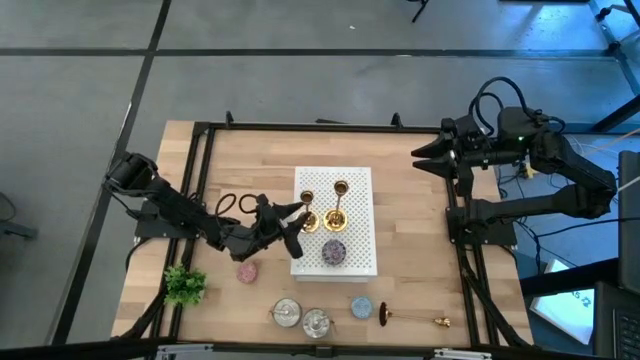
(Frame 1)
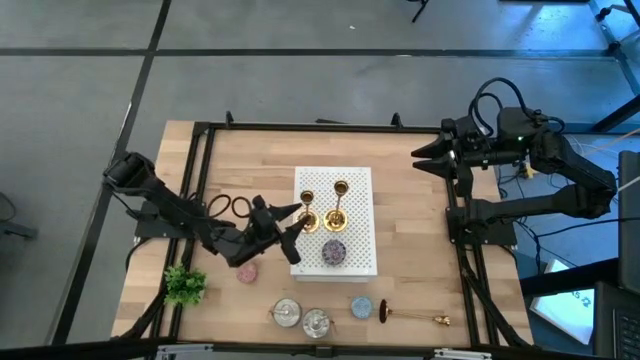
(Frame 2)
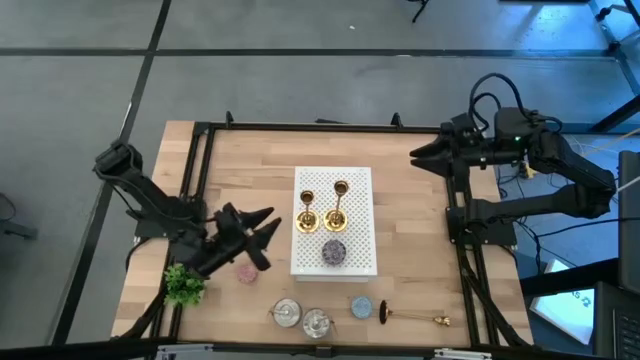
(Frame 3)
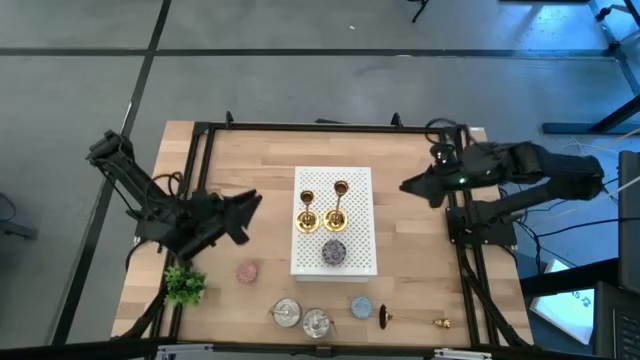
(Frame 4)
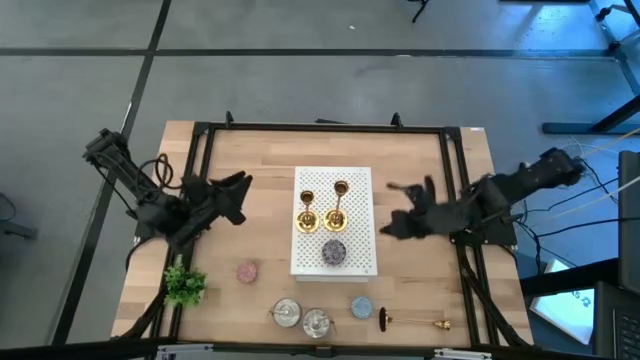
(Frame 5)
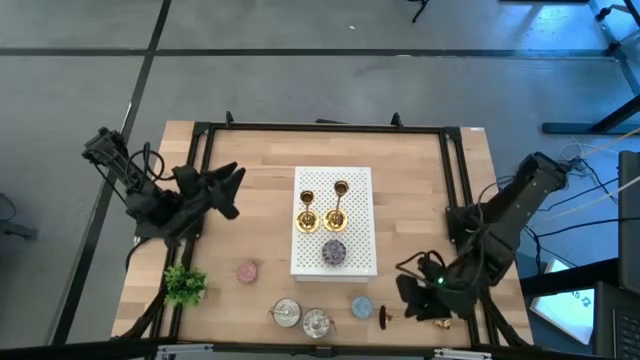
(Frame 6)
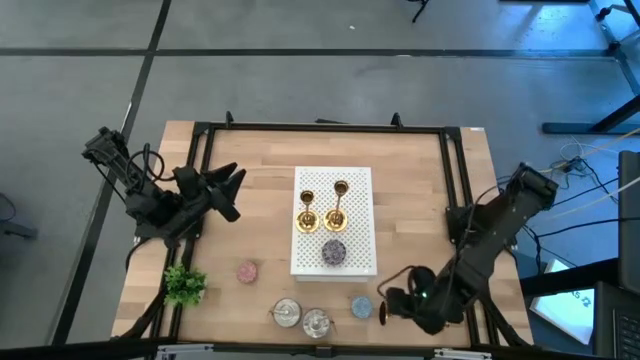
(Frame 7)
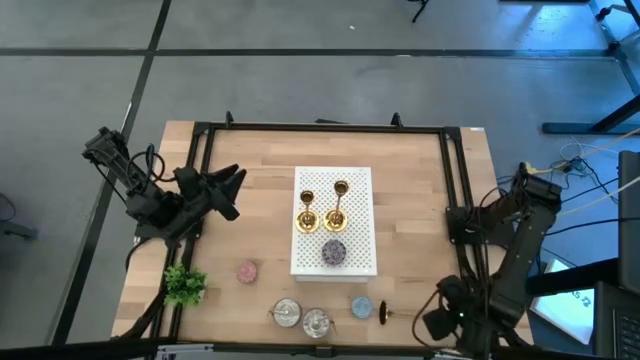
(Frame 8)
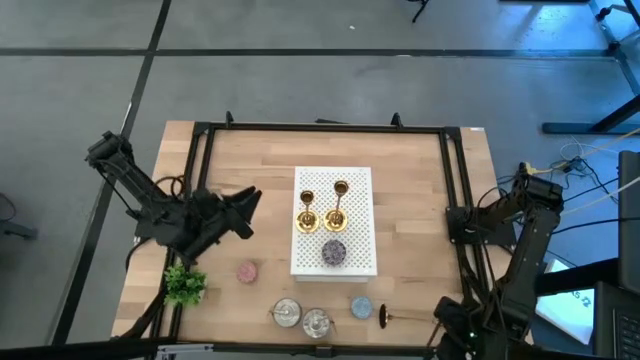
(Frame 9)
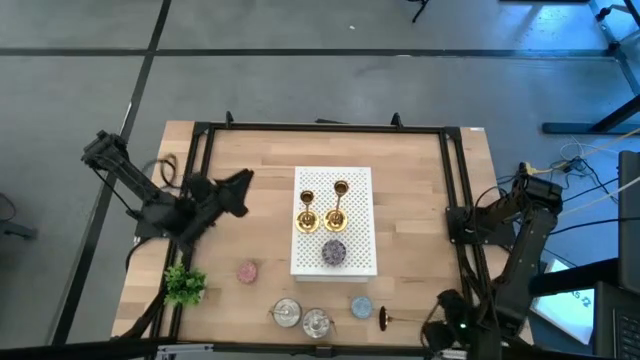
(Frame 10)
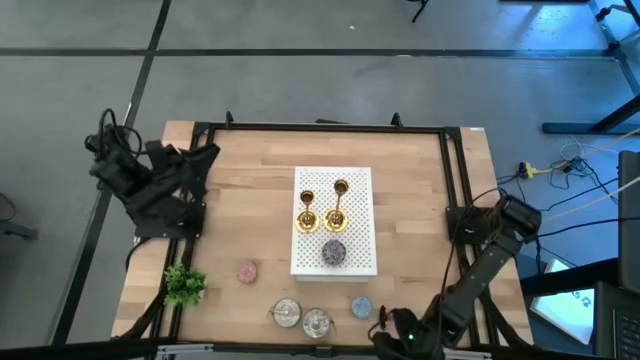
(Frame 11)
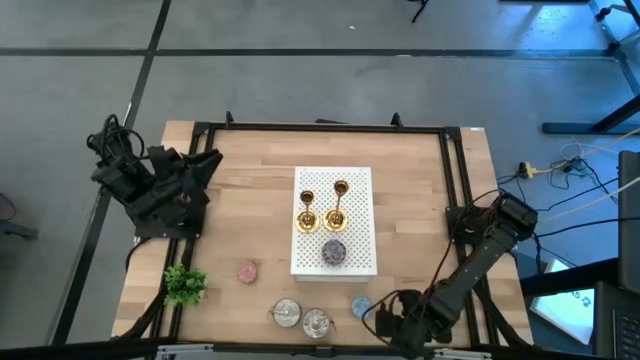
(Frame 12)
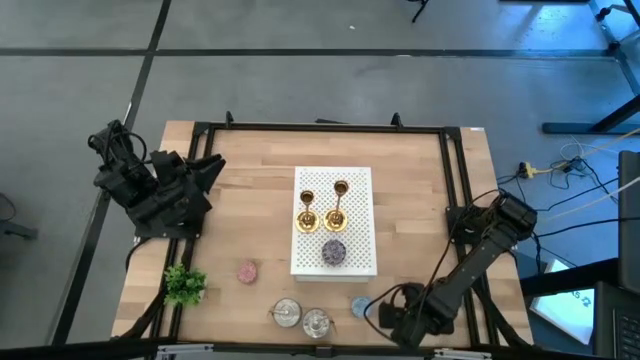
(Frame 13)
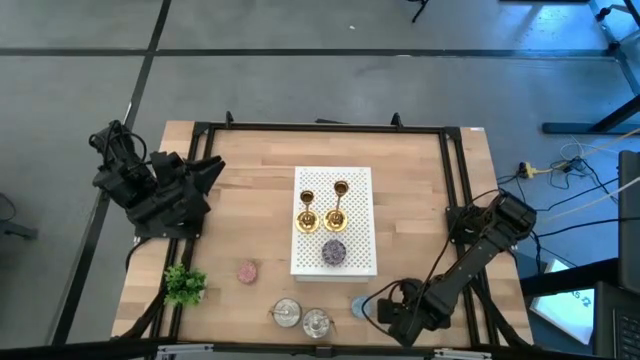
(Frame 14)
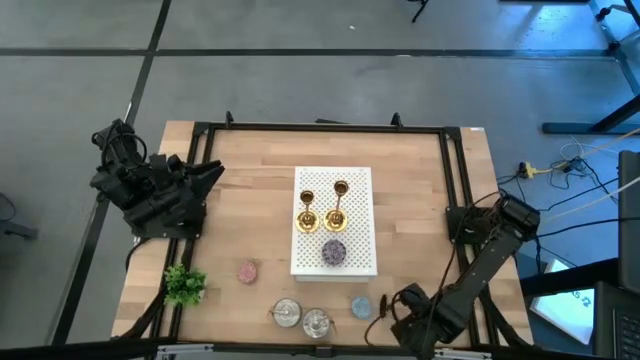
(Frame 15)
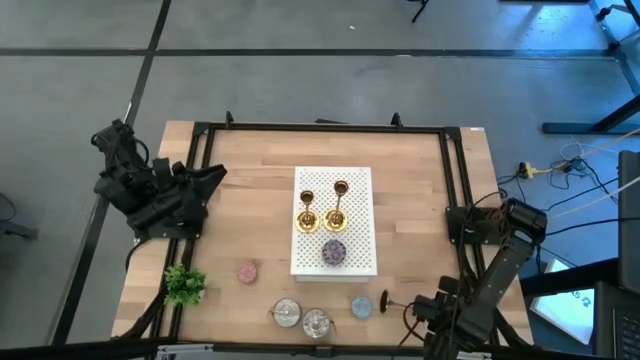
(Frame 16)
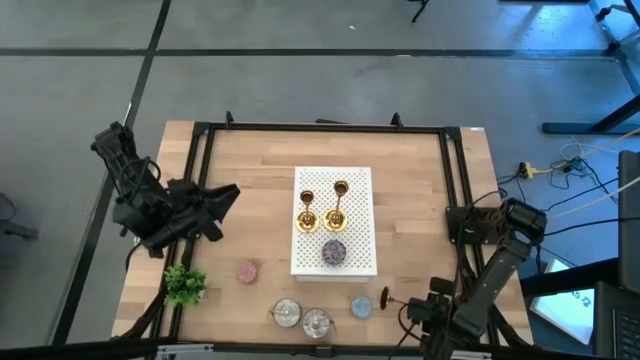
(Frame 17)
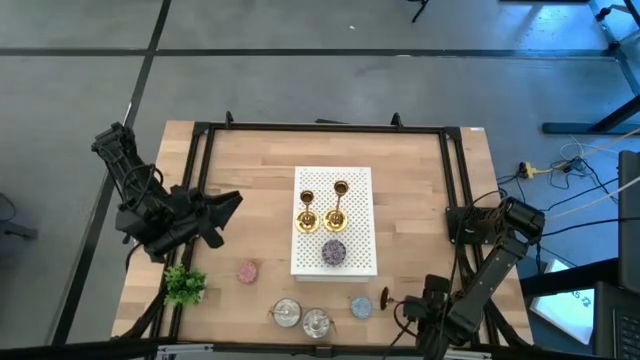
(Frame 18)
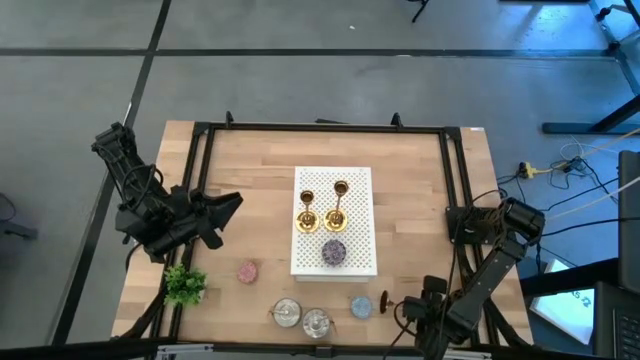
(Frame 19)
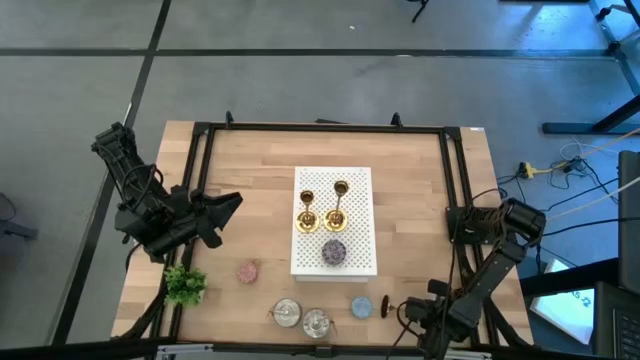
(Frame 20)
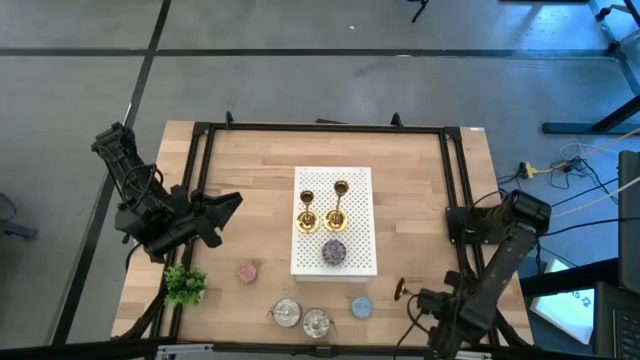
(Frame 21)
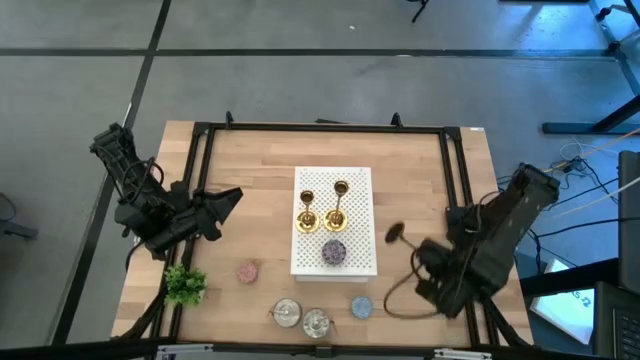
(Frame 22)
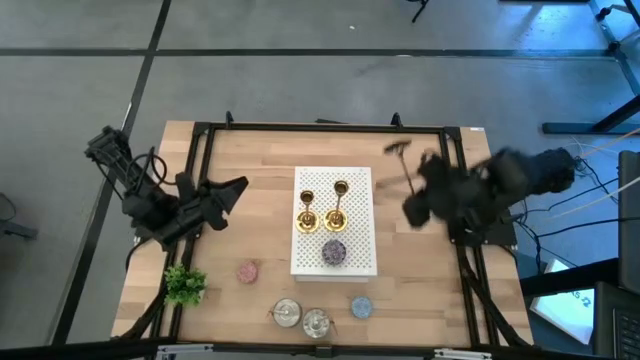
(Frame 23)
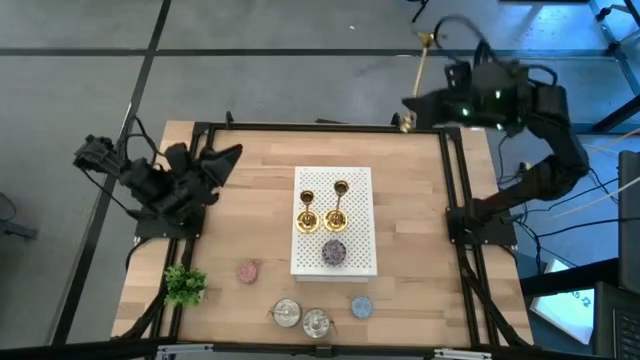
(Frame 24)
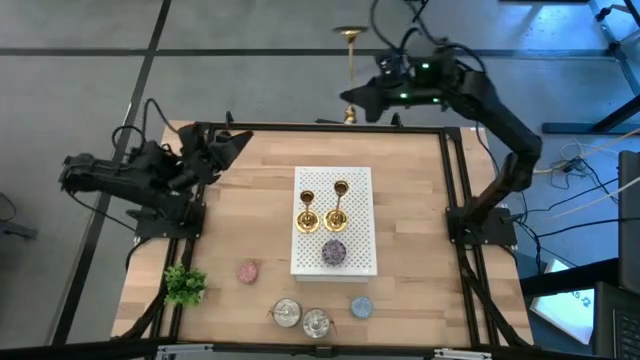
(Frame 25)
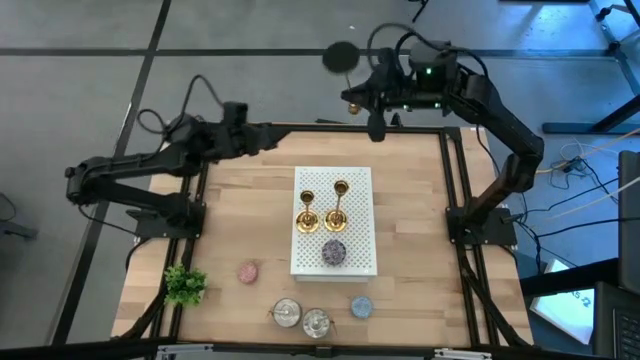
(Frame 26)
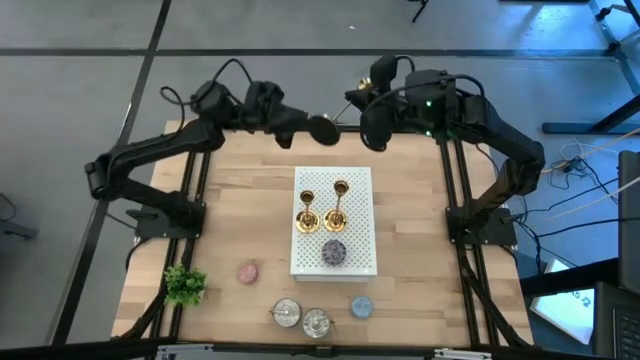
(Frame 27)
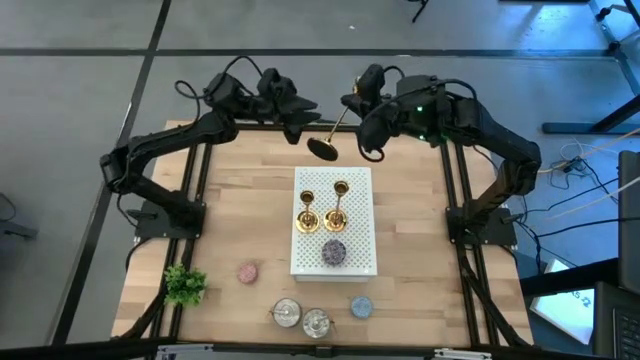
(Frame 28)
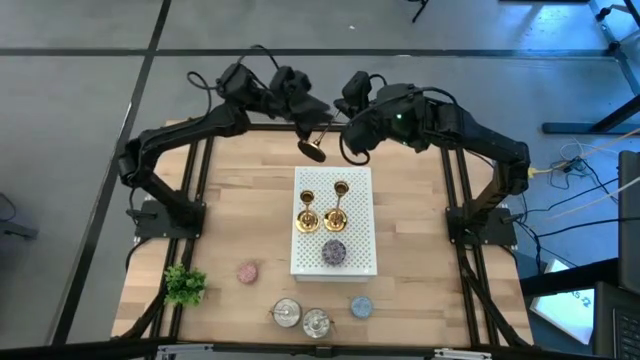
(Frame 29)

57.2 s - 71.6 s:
Task: Pick & Place candle stick holders
Put the gold candle holder on the shelf aligned with the other gold candle holders

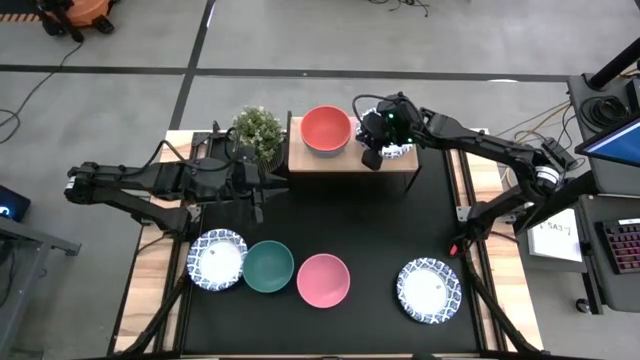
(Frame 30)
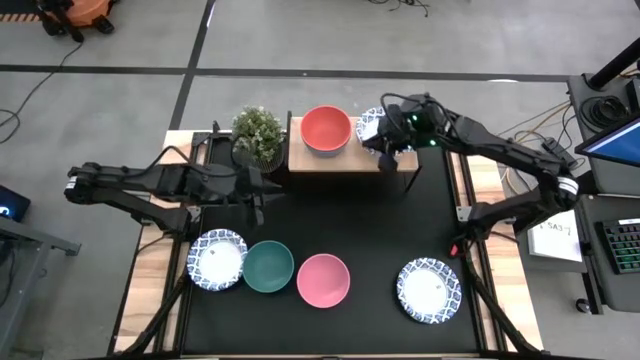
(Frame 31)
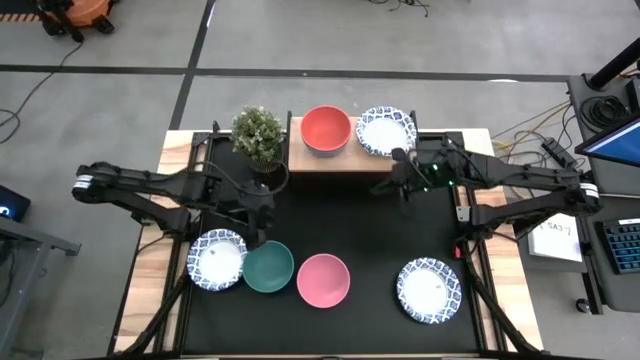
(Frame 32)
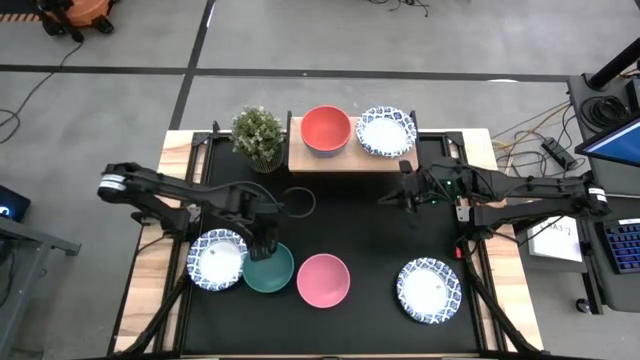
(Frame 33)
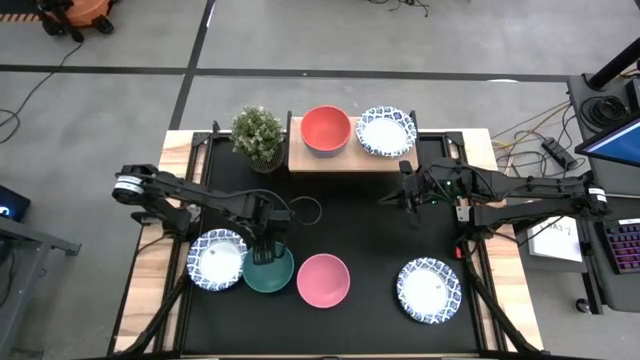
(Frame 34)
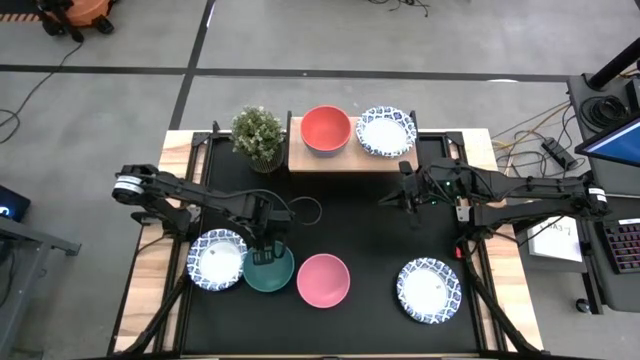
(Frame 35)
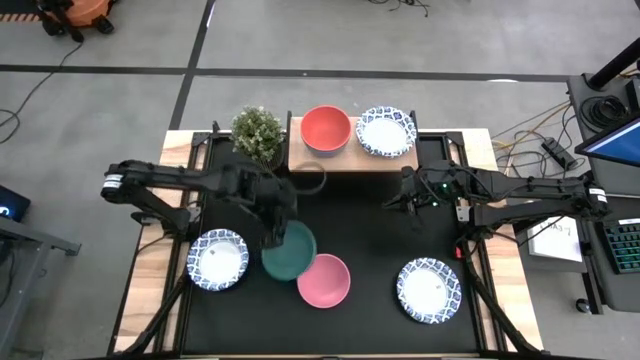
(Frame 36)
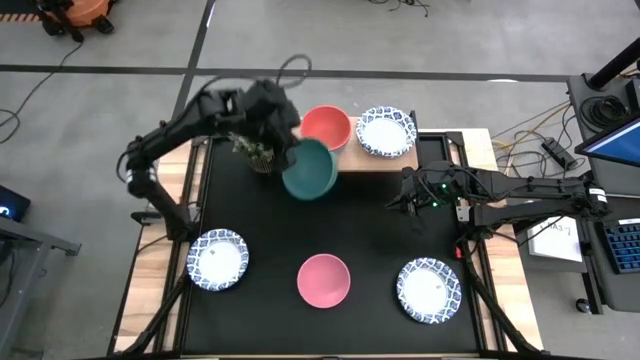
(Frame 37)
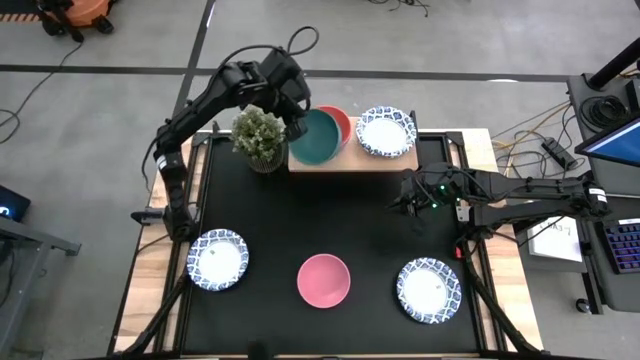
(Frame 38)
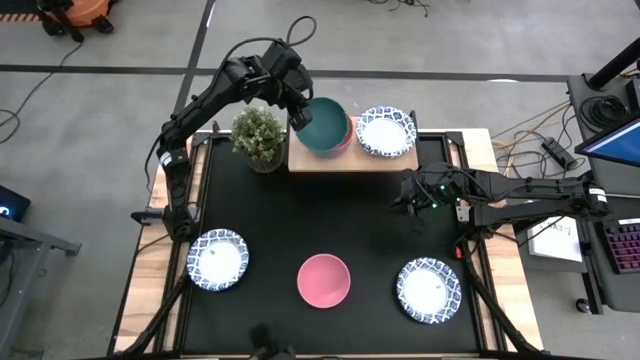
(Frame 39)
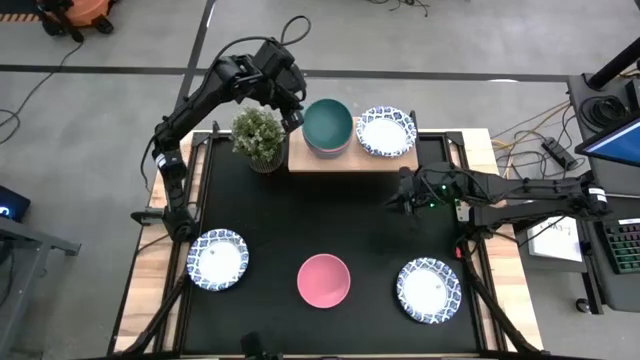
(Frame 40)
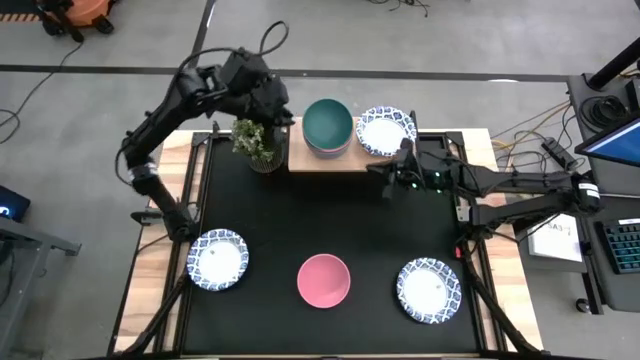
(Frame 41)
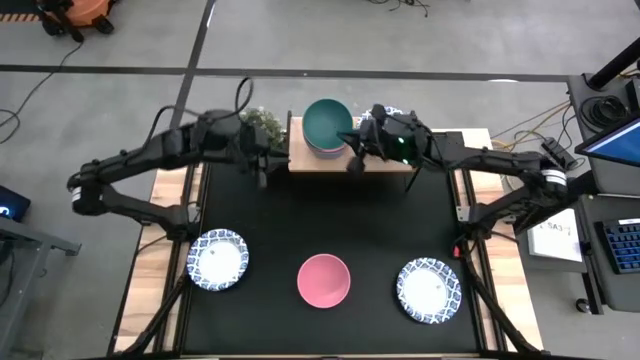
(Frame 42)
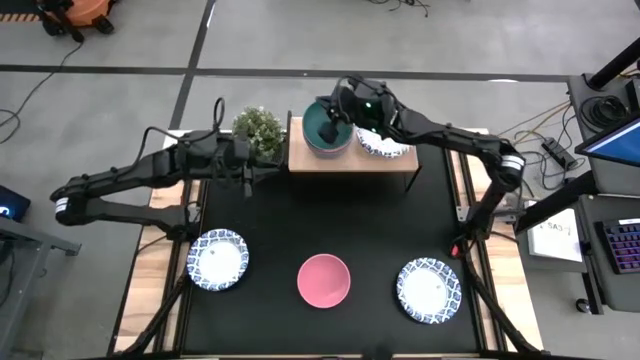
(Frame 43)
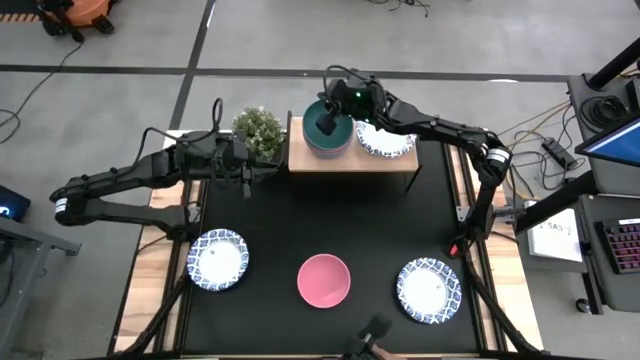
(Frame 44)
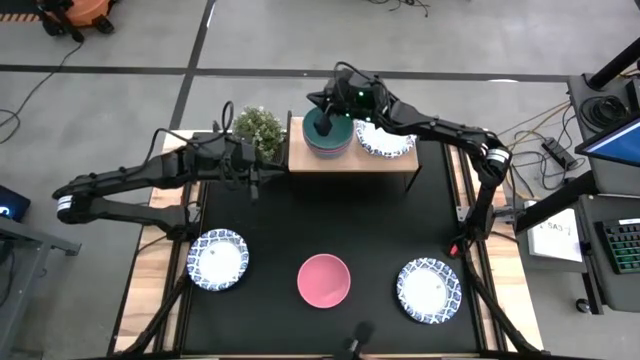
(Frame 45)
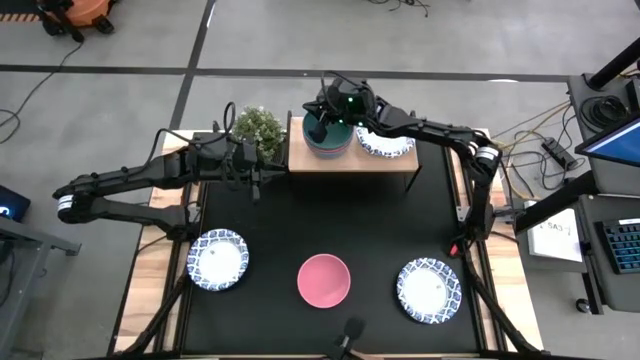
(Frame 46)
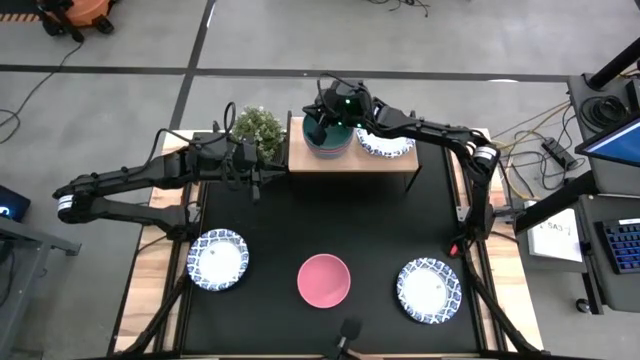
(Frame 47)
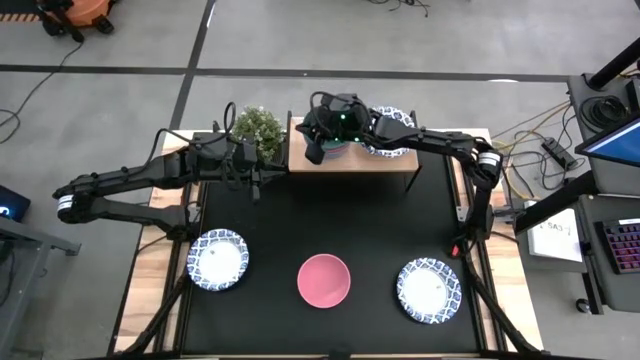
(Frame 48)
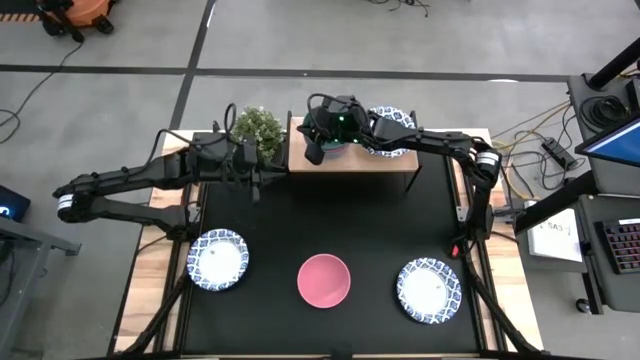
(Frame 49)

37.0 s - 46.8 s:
Task: Place and stack bowls onto a shelf
Stack the green bowl on top of the orange bowl
